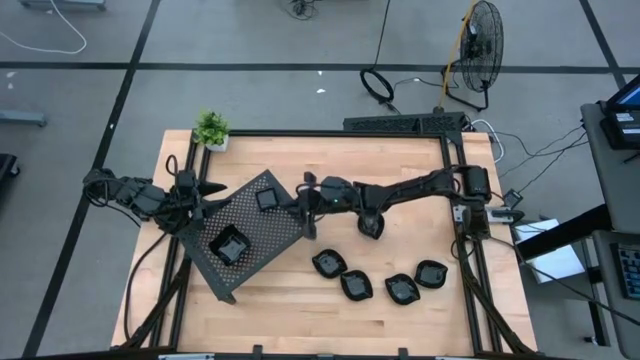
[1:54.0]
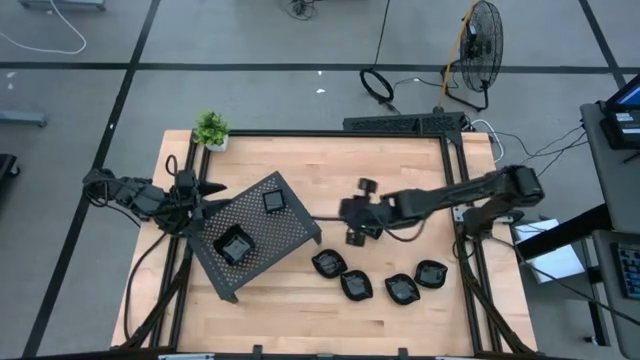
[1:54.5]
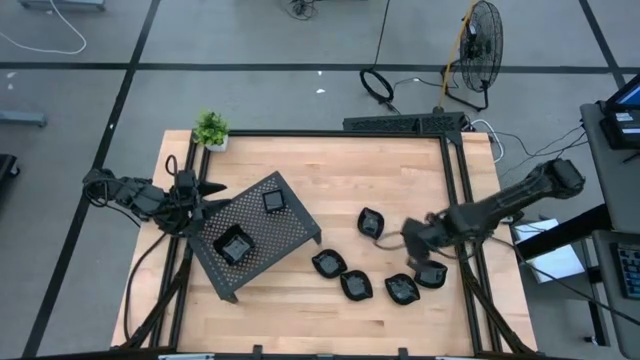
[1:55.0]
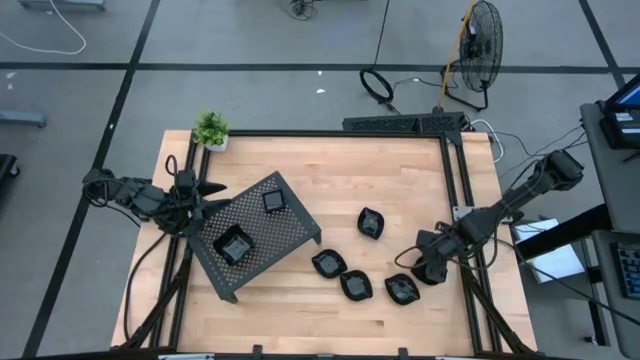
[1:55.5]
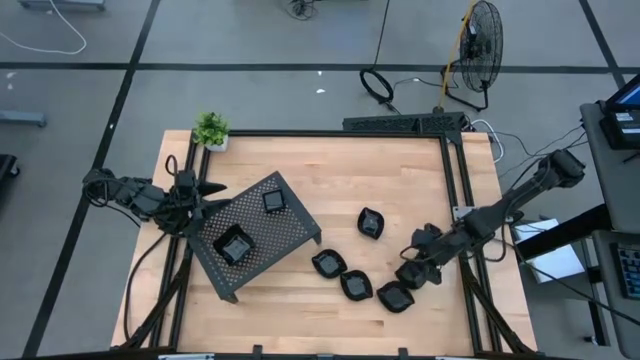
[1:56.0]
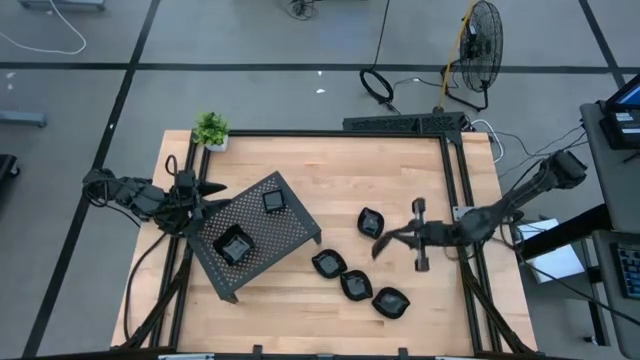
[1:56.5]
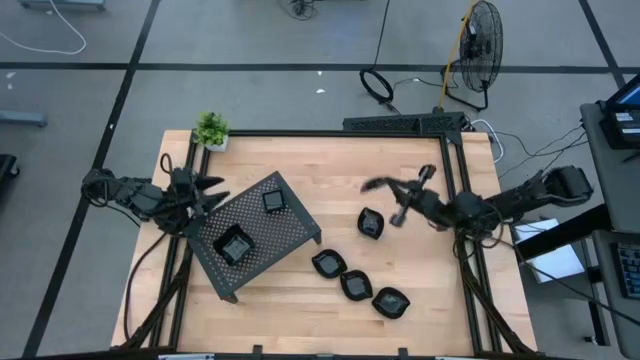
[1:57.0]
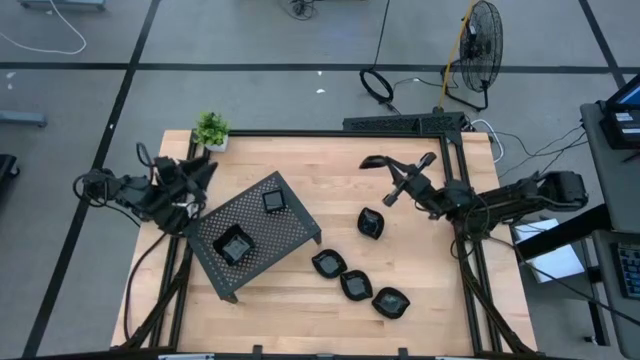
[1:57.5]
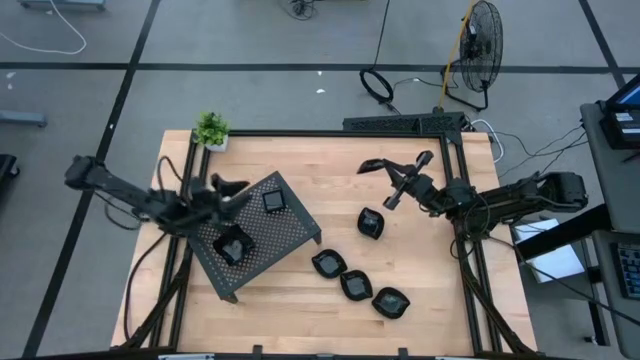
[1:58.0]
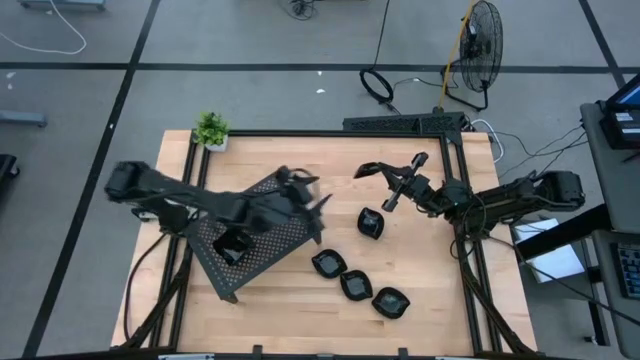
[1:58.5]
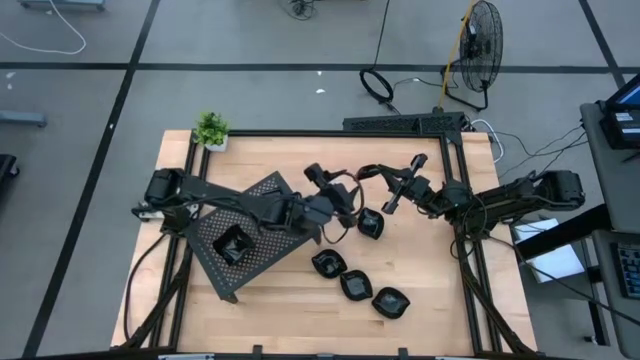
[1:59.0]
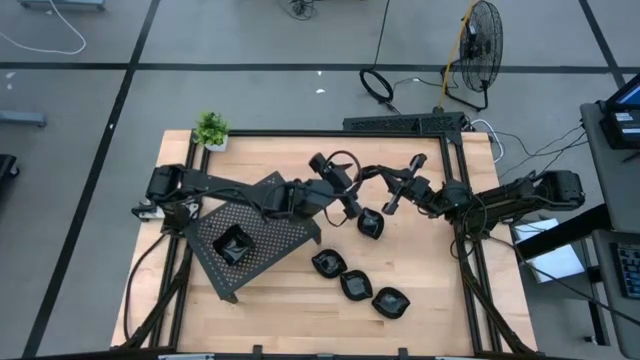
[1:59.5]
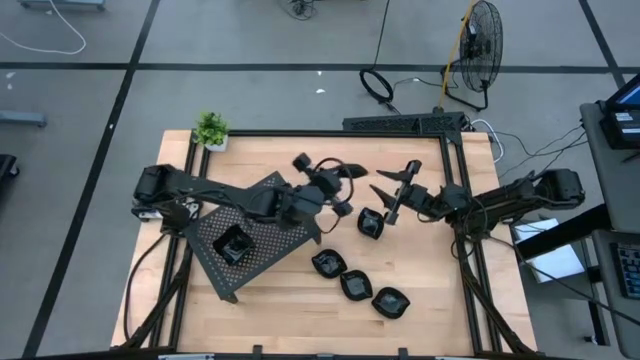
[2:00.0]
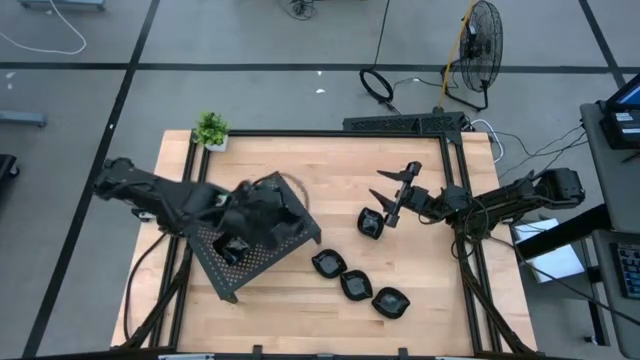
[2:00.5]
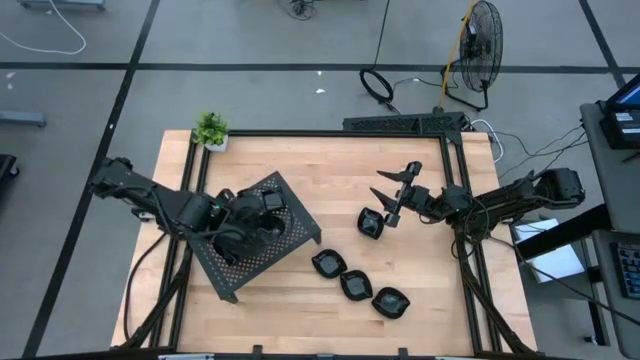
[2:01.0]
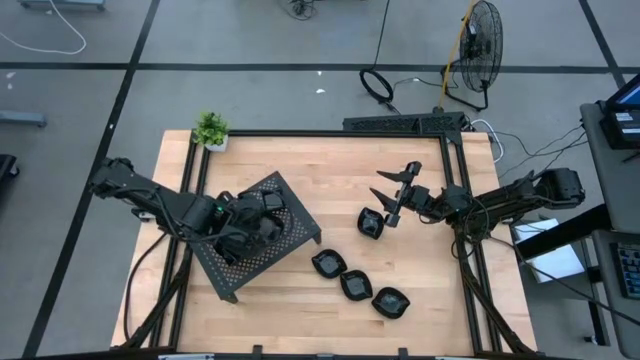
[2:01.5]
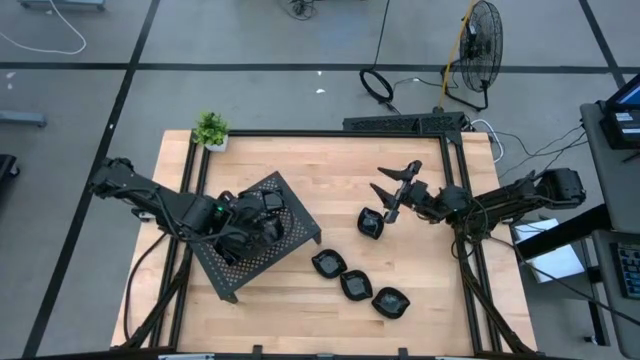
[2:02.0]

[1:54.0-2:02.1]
Task: Pick & Place Mini shaped plates
Put the leaf-shaped plate on the shelf

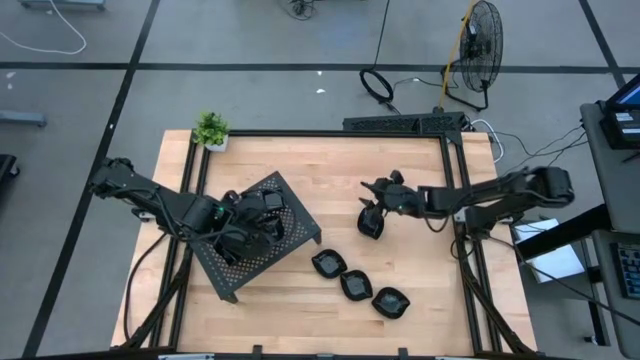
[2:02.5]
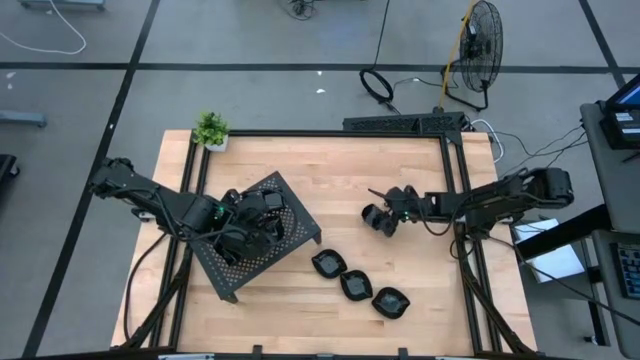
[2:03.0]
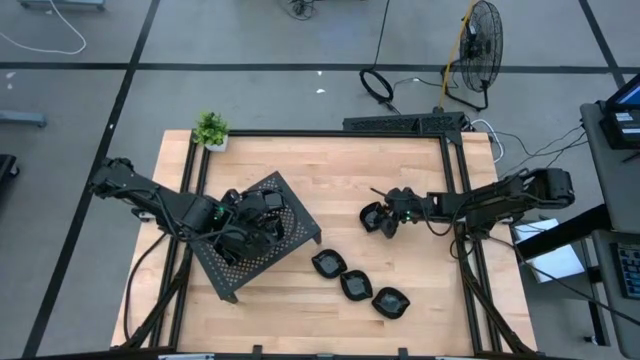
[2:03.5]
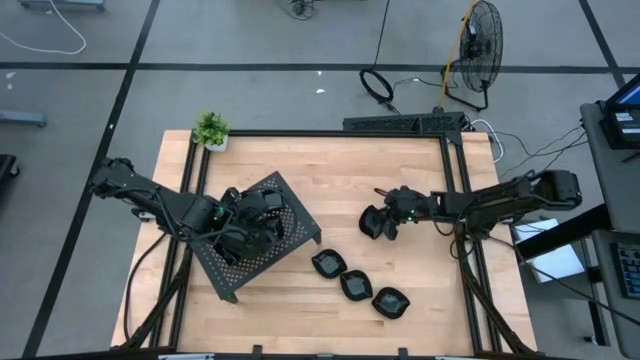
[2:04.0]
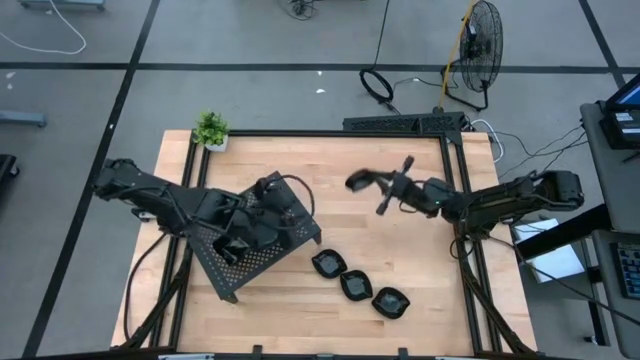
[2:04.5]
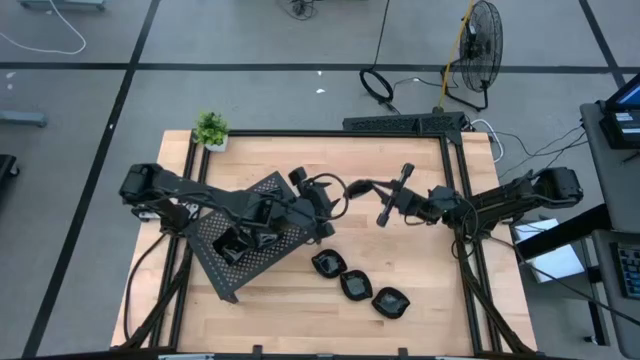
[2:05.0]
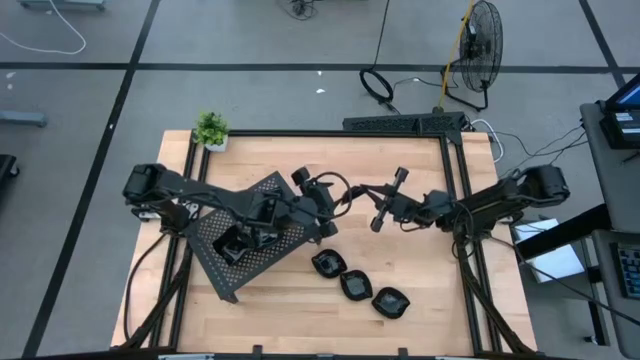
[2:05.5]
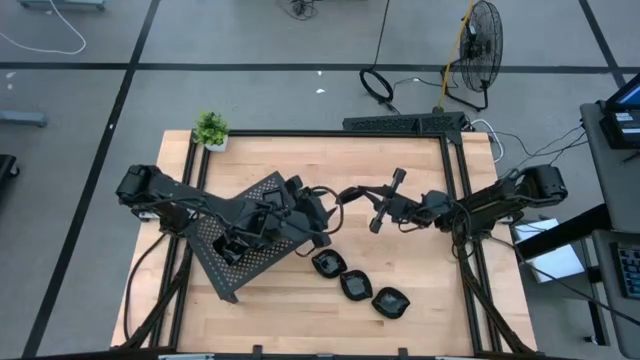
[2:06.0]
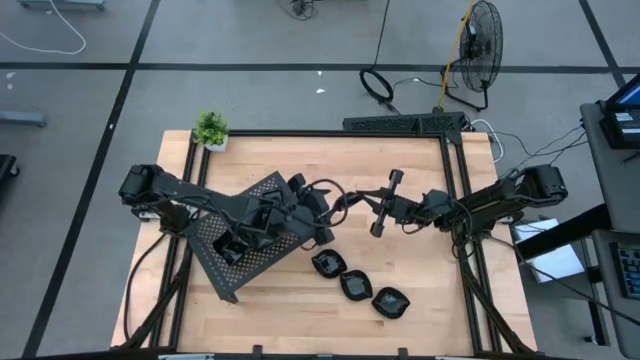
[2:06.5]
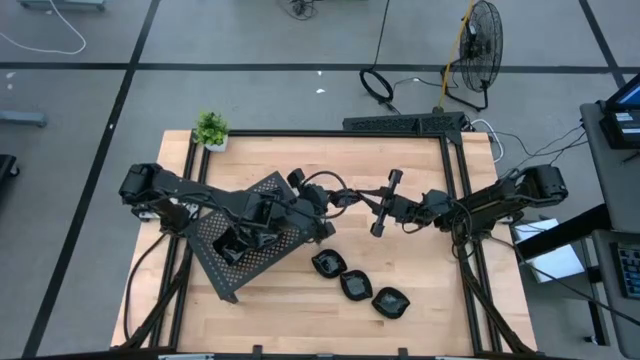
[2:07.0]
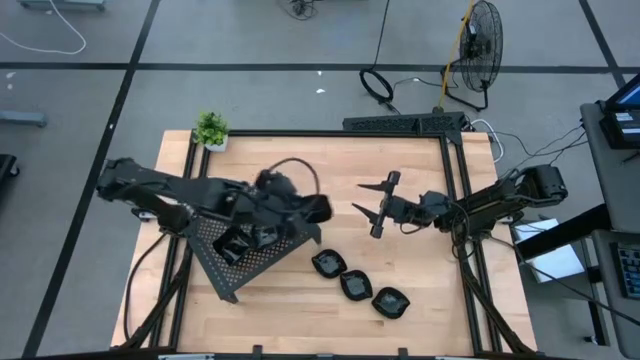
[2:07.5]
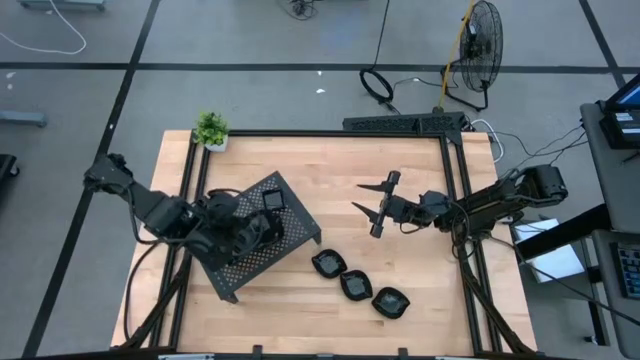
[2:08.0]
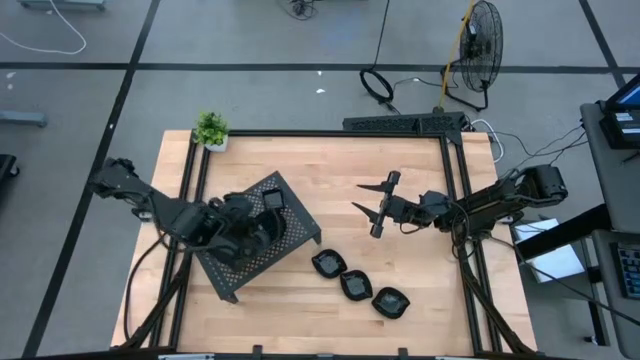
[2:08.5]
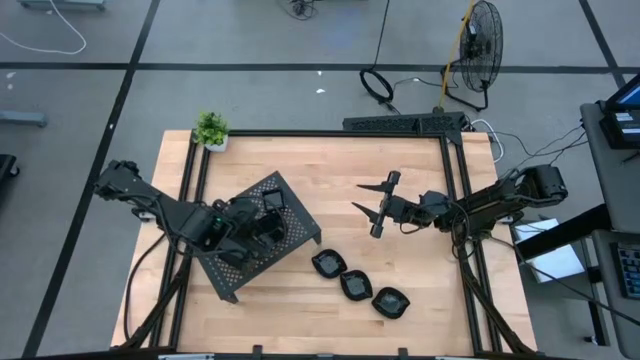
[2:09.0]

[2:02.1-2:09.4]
Stack the leaf-shaped plate on top of the leaf-shaped plate on the shelf

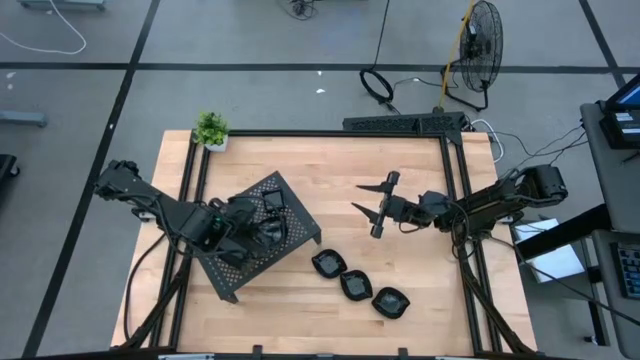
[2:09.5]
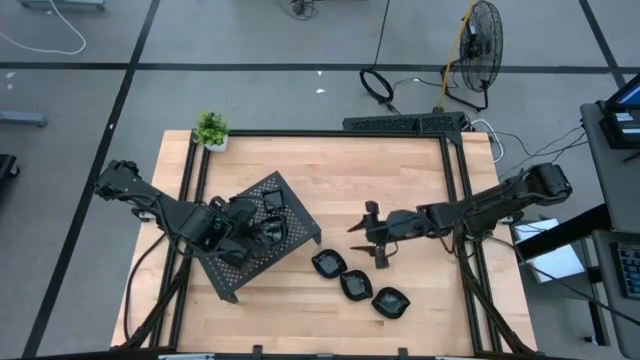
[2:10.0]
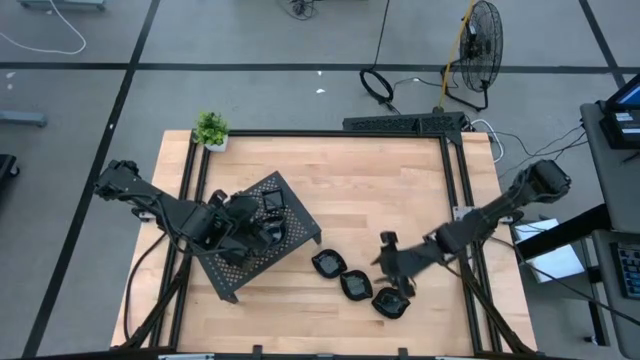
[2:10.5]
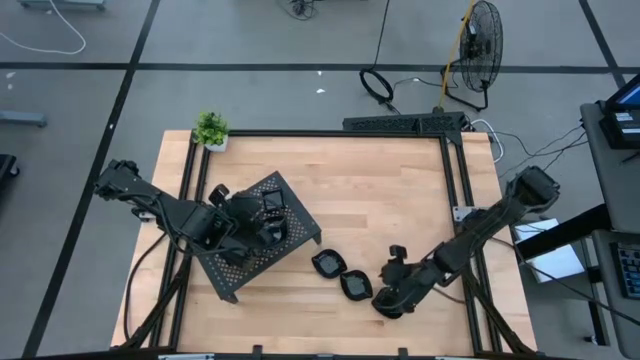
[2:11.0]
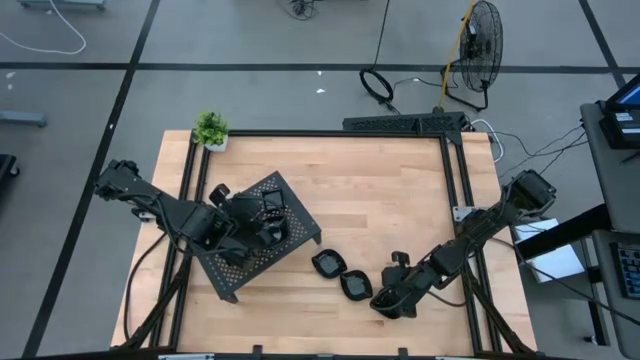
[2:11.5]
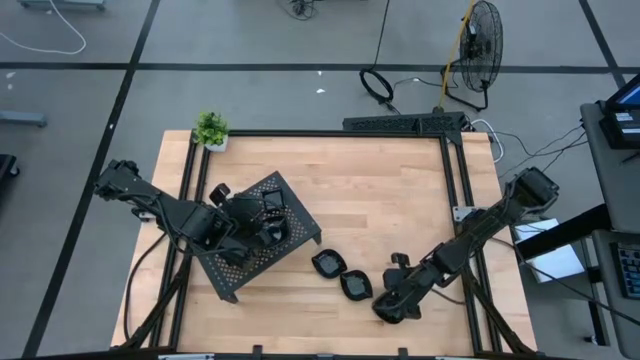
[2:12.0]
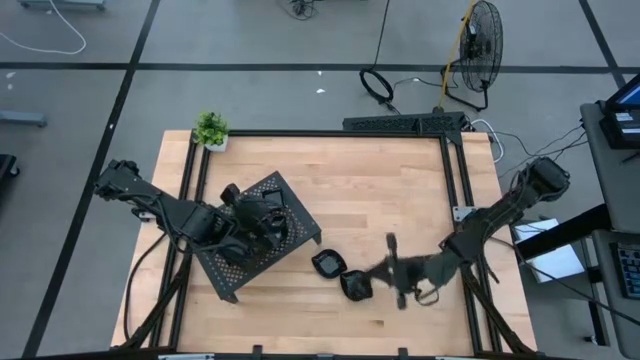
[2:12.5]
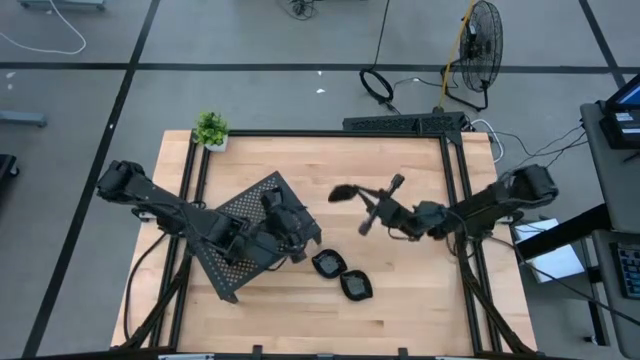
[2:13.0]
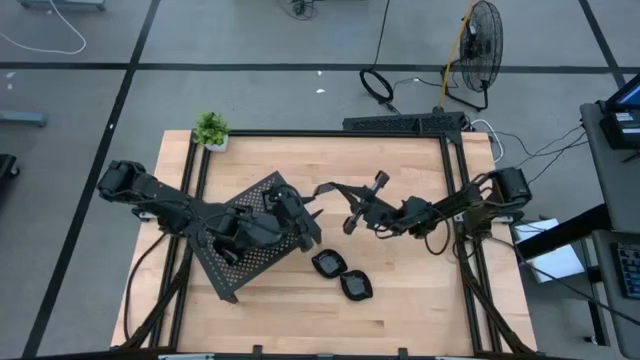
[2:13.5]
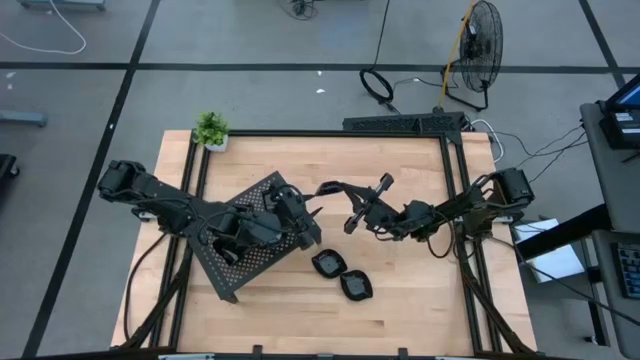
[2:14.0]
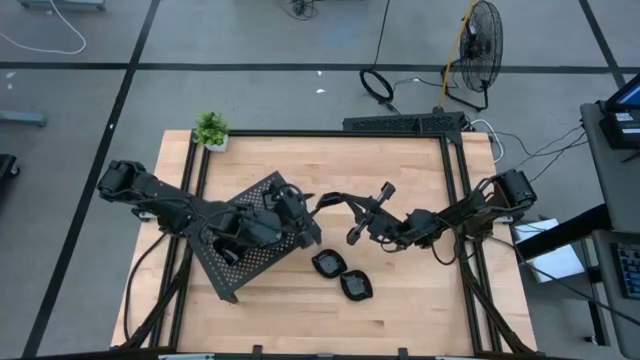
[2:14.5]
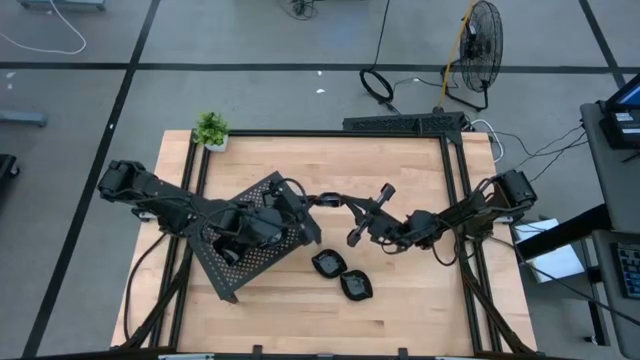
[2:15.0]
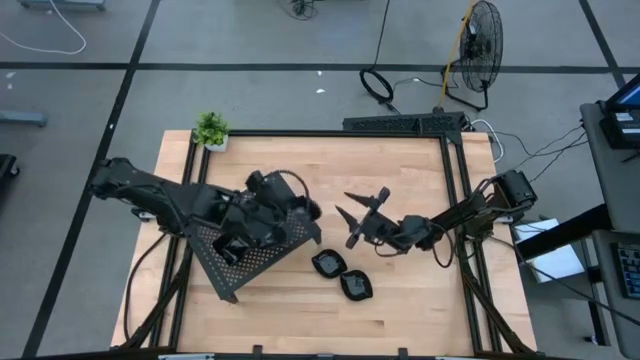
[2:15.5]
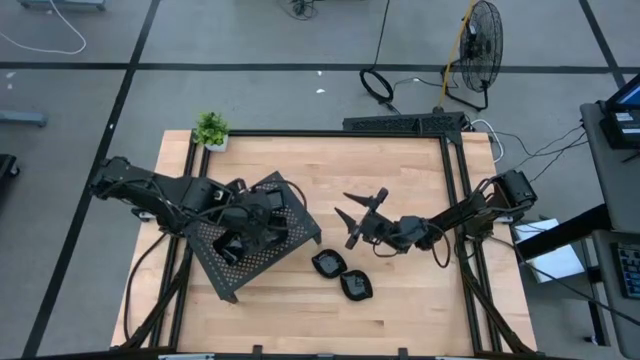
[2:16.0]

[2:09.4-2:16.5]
Stack the leaf-shaped plate on top of the leaf-shaped plate on the shelf
